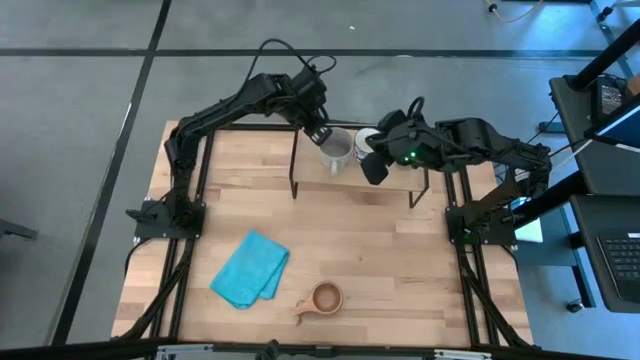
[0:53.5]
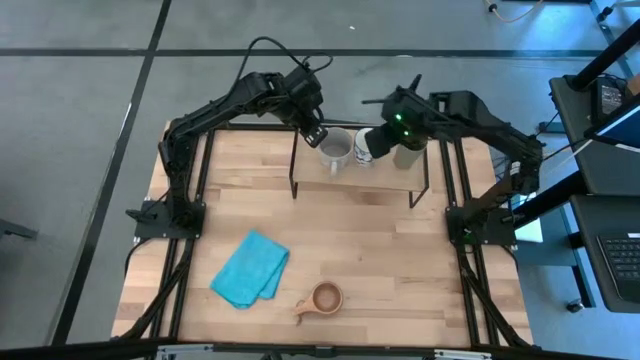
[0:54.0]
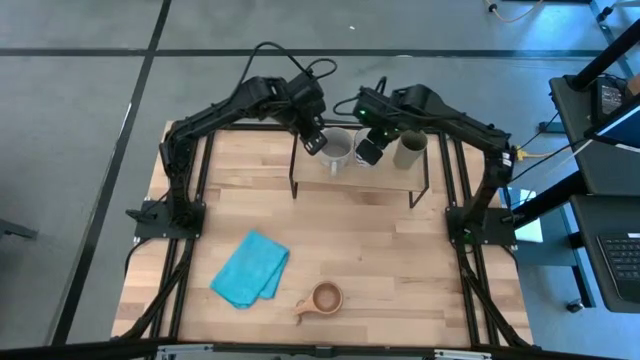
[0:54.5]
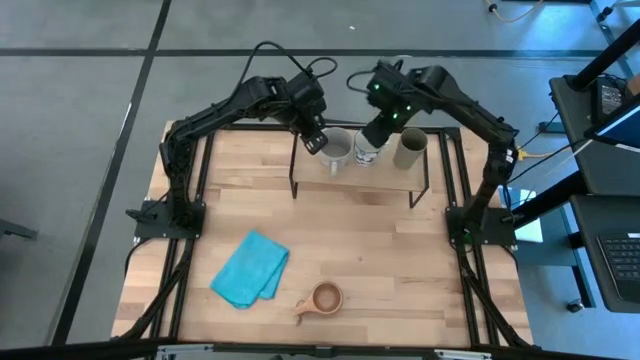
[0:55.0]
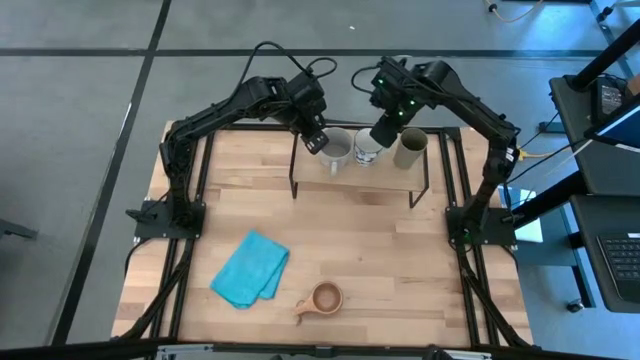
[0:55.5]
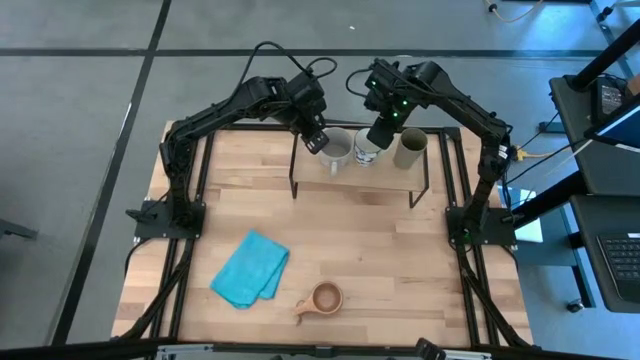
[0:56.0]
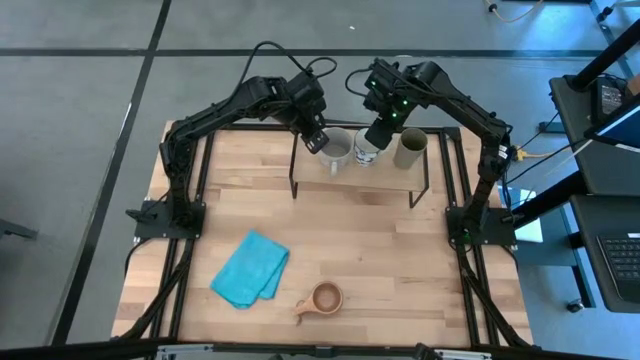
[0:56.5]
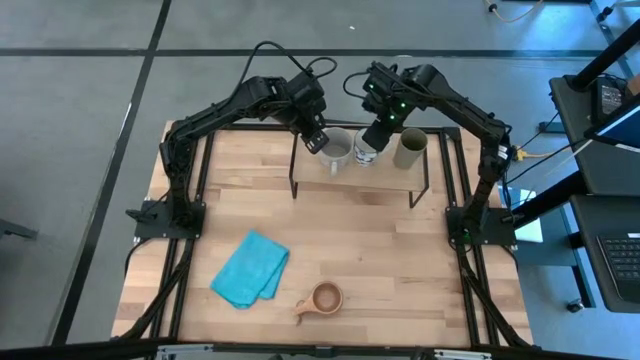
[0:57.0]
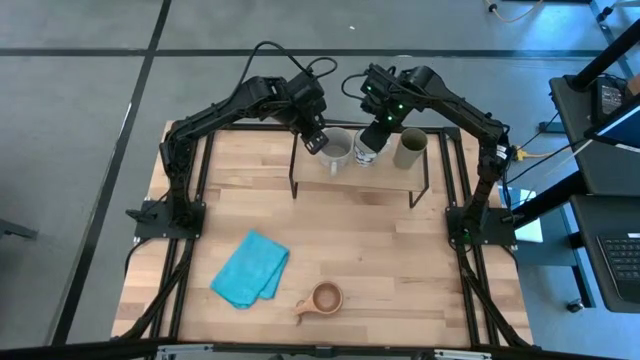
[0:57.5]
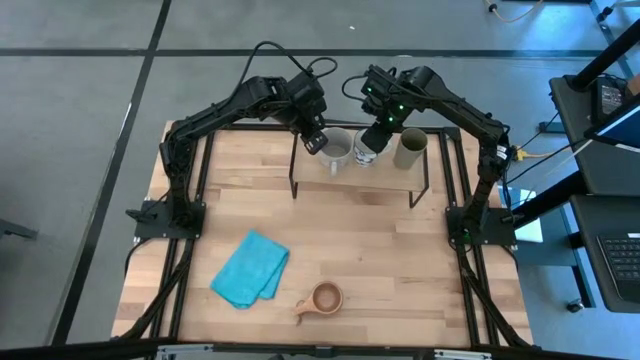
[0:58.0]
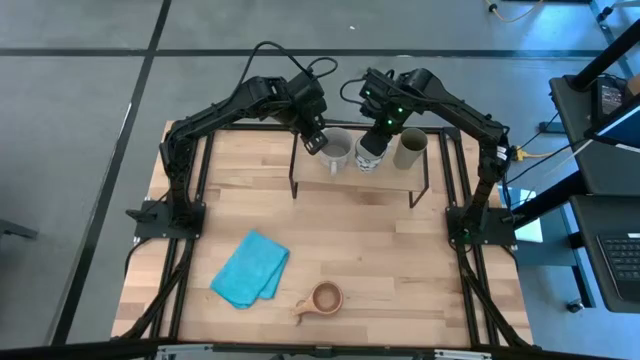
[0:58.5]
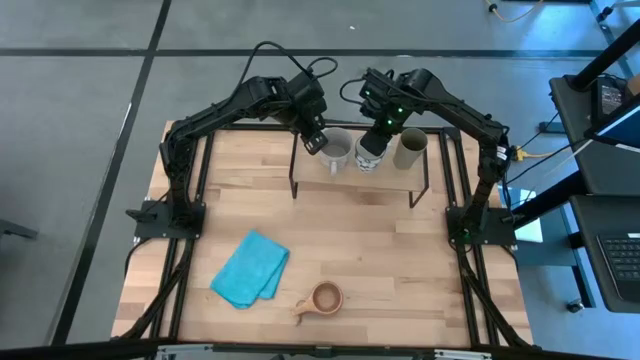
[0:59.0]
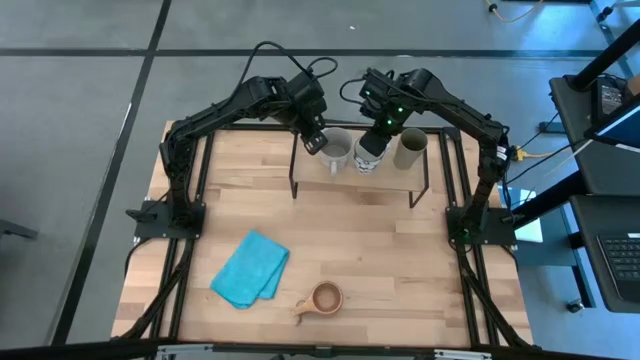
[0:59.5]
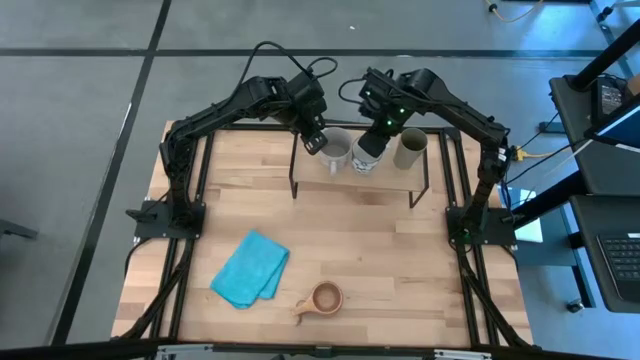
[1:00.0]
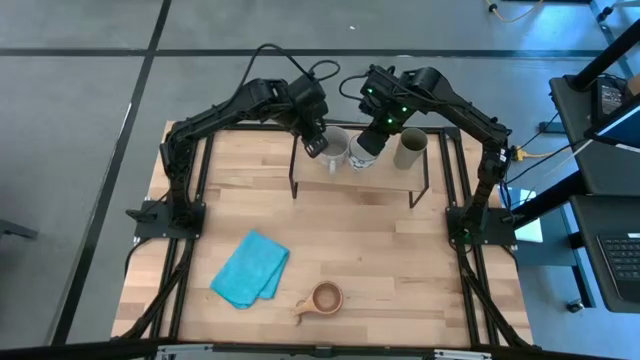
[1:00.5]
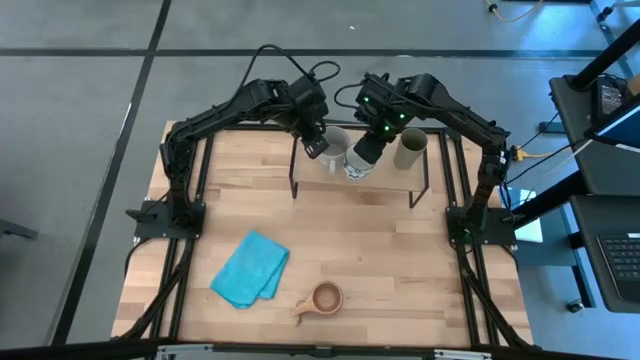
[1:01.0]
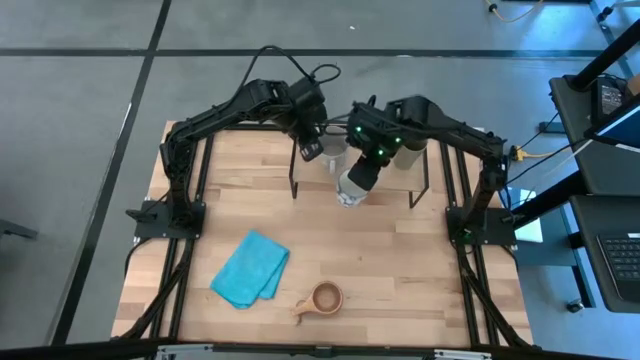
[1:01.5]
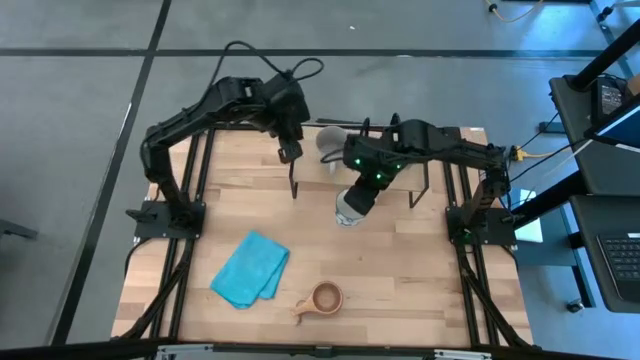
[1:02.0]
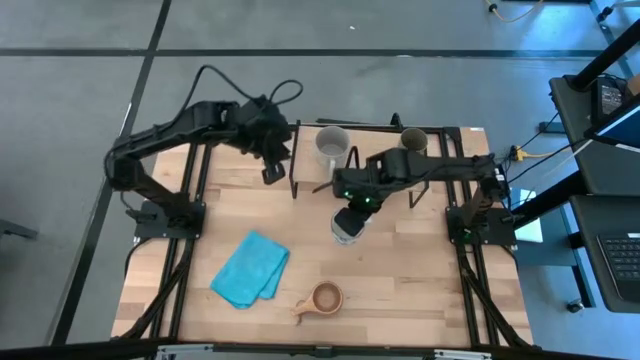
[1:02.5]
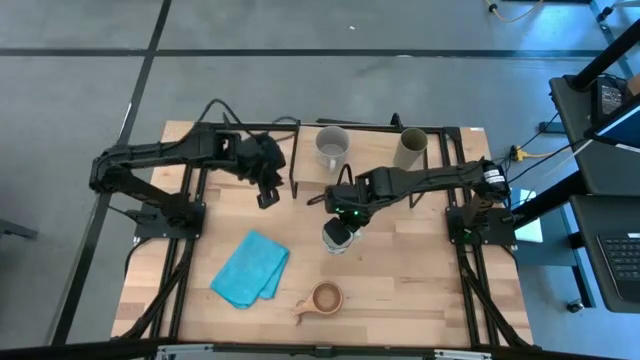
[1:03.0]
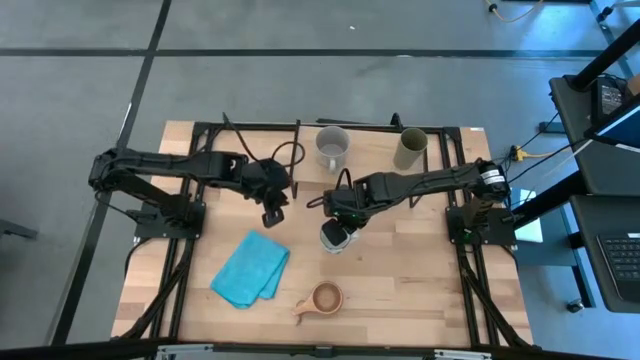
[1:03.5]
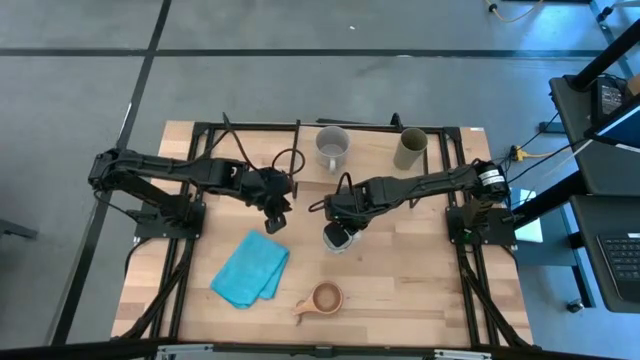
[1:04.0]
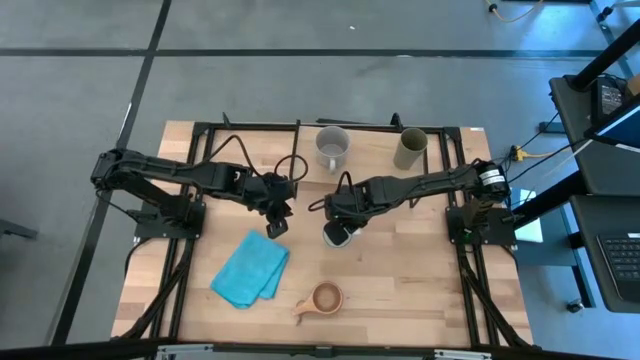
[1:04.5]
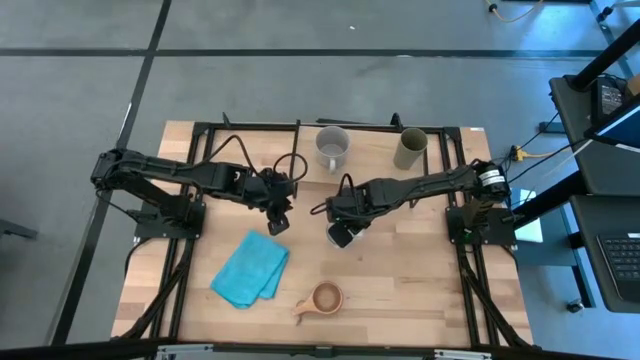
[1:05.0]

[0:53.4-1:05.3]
Task: Stack small to large cups/mugs on shelf
Remove the blue mug from the shelf

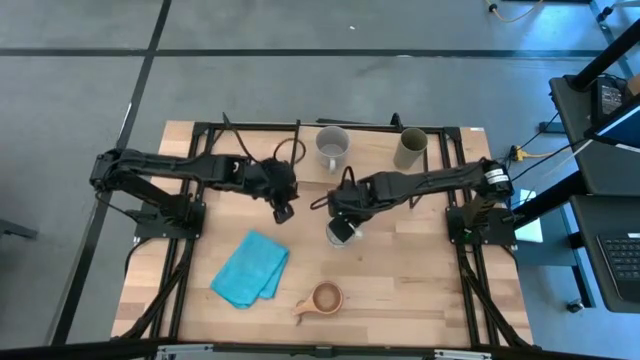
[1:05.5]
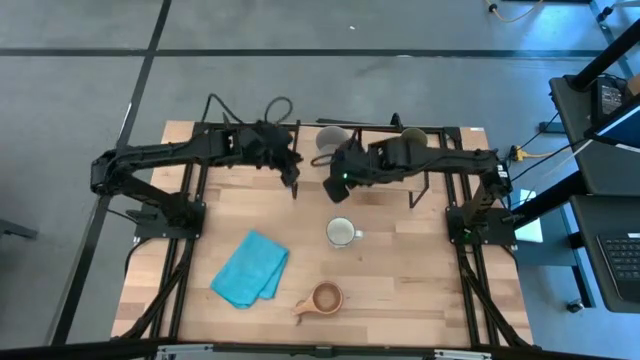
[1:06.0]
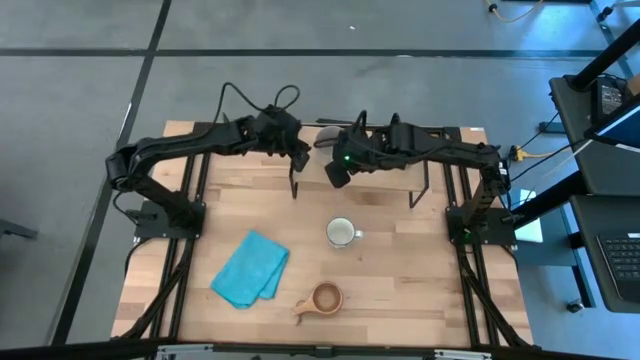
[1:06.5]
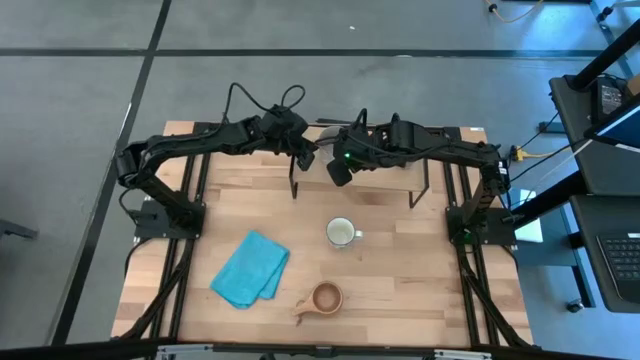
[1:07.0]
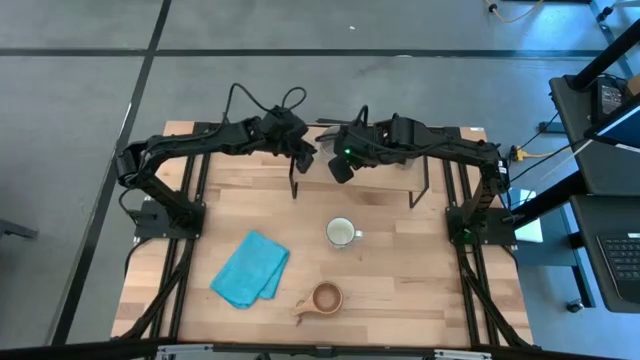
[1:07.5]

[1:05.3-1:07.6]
Adjust the gray mug on the shelf

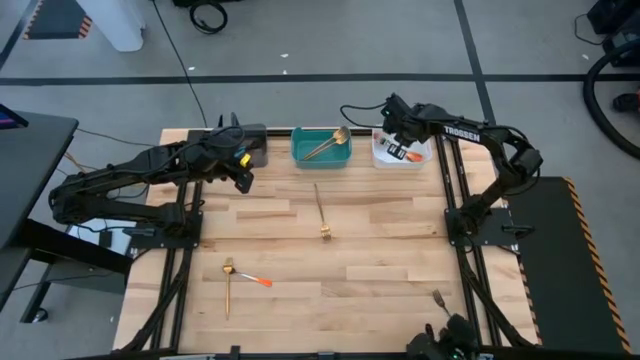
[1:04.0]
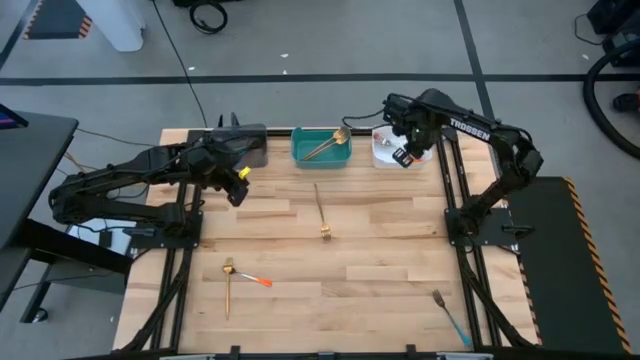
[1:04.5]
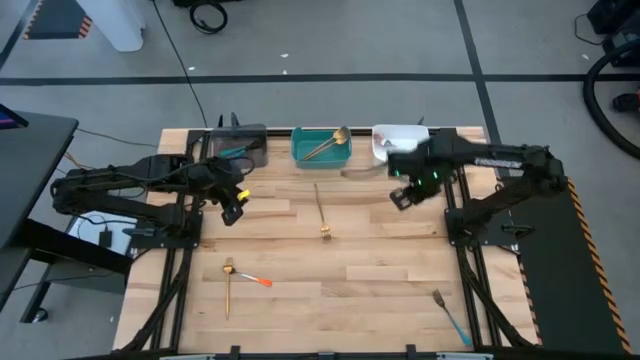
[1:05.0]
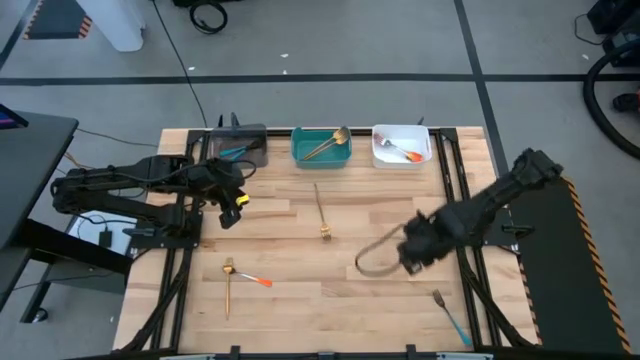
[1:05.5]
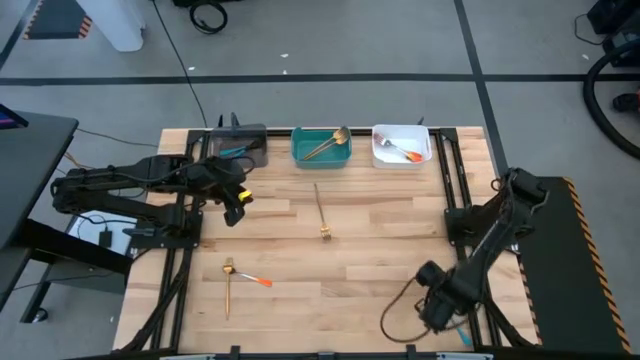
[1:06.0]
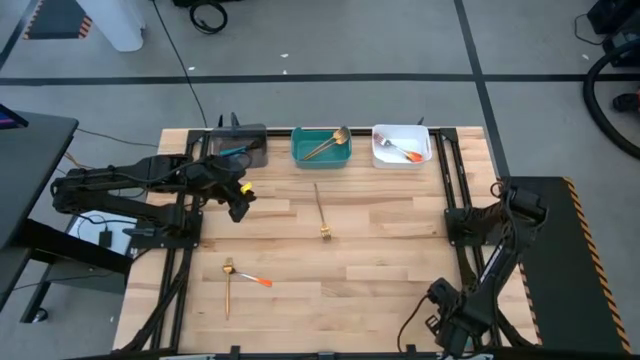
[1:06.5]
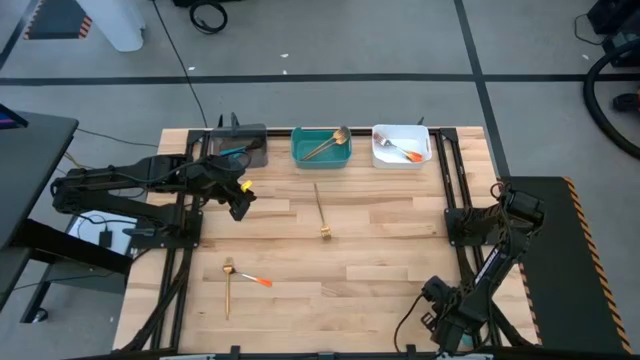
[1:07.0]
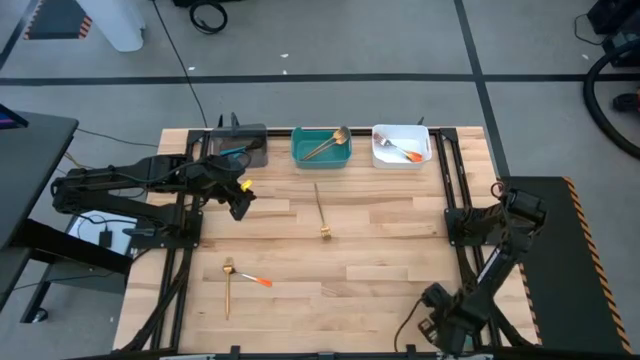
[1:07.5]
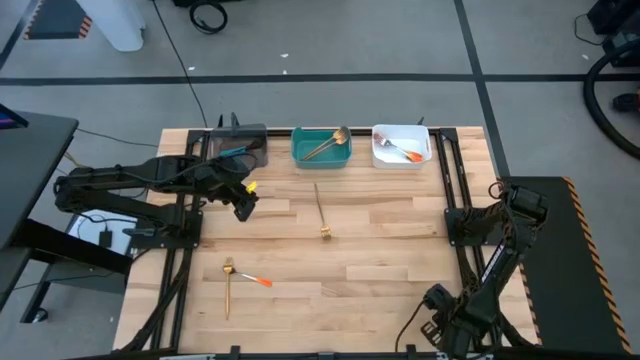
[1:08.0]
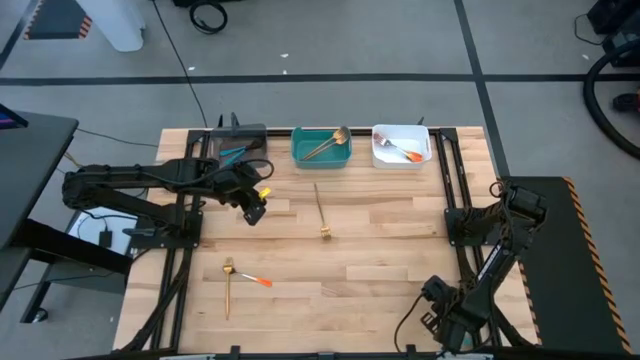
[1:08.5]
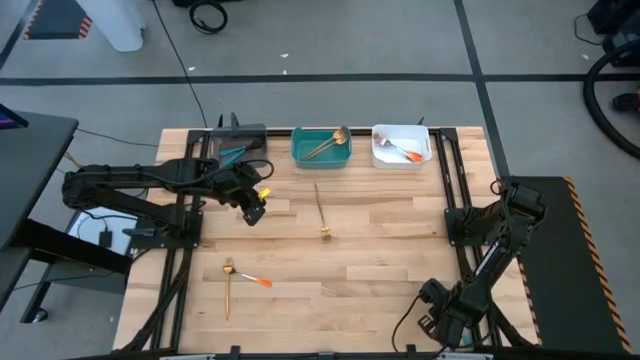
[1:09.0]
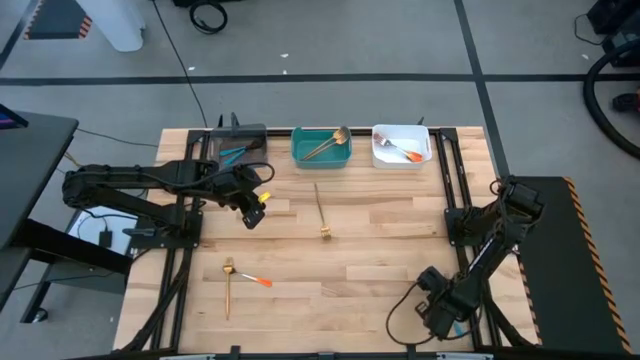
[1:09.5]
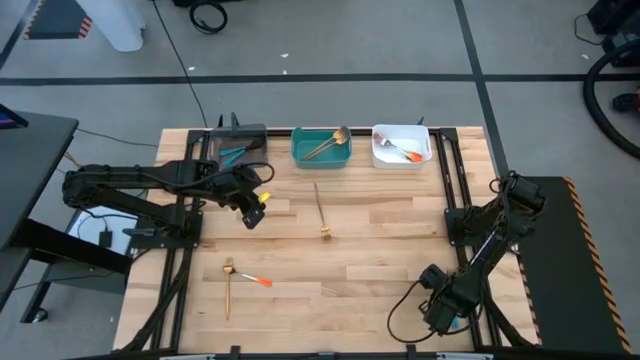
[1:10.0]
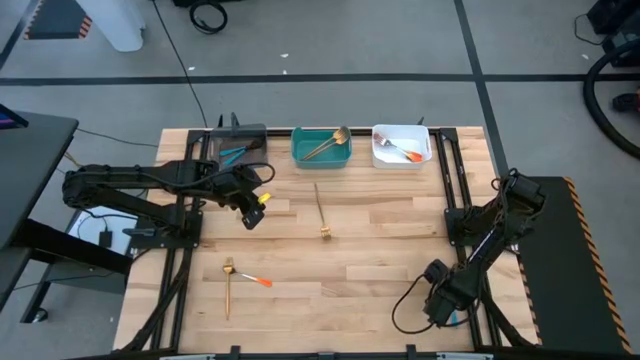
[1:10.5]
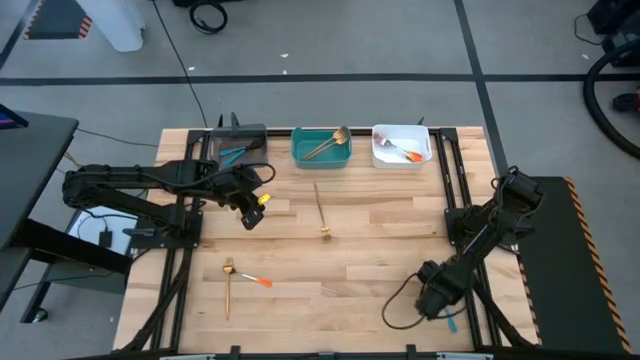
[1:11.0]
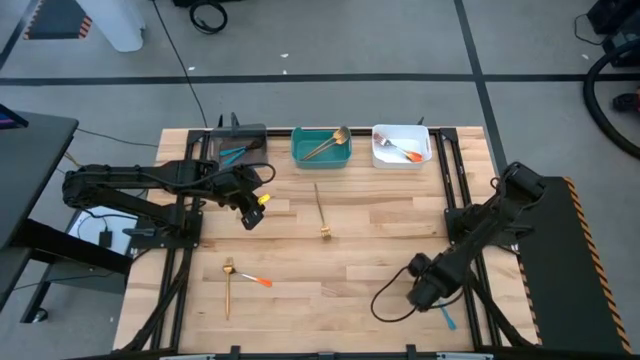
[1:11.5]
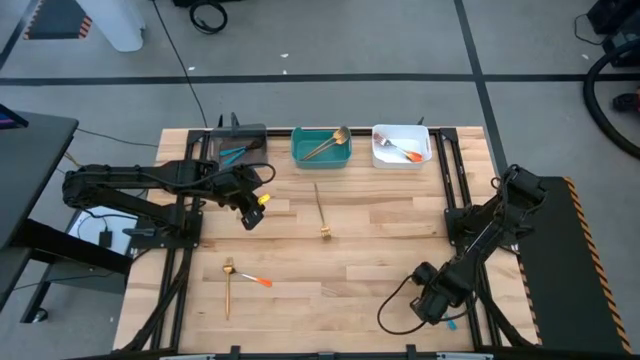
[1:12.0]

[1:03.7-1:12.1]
Task: Sort silverware by color (type)
Put the blue fork into the black bin
